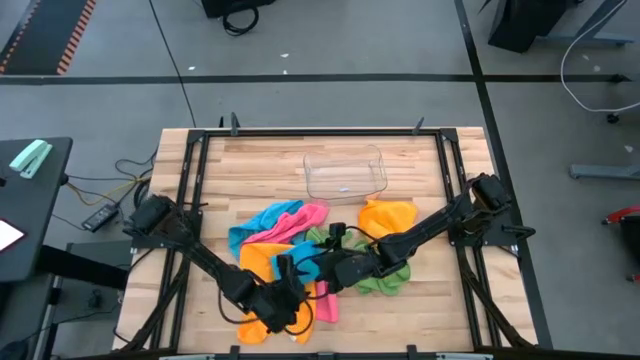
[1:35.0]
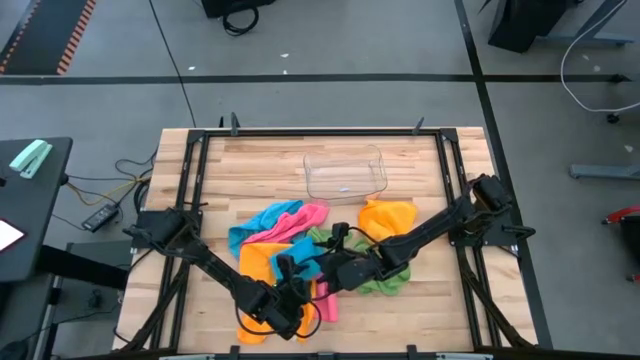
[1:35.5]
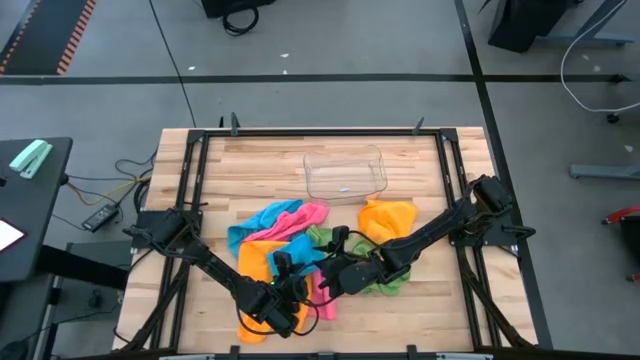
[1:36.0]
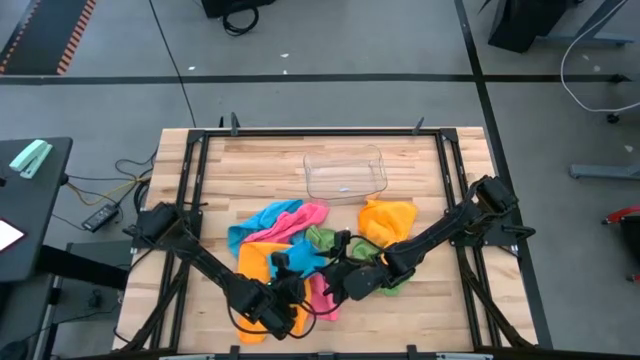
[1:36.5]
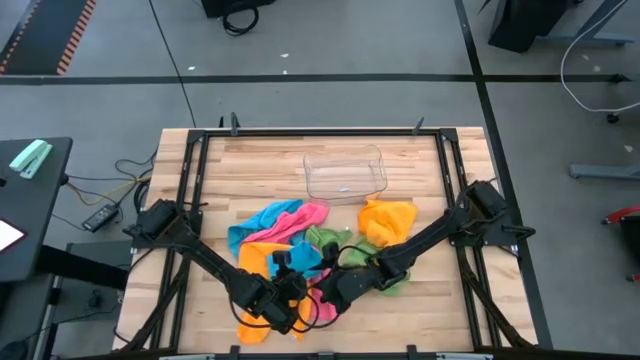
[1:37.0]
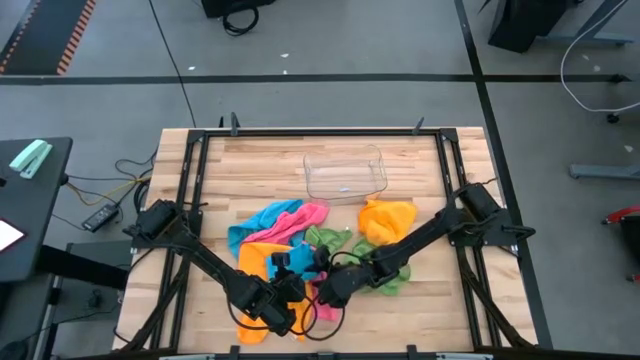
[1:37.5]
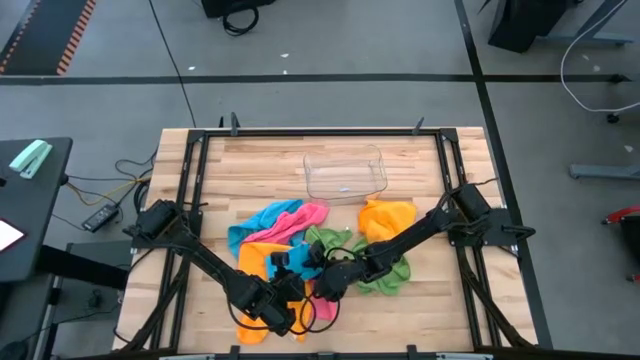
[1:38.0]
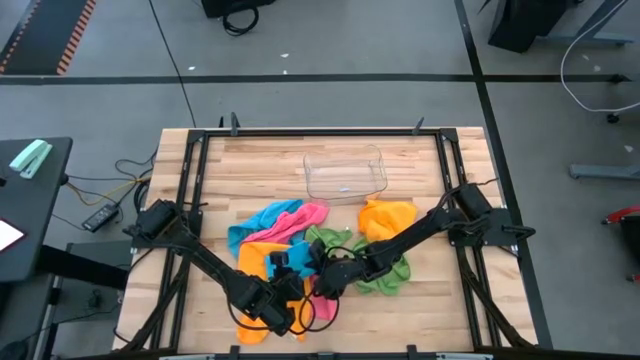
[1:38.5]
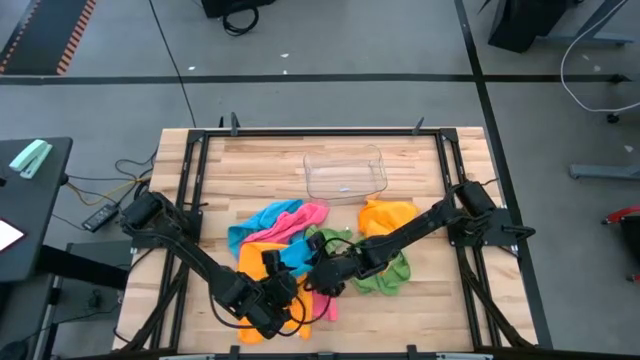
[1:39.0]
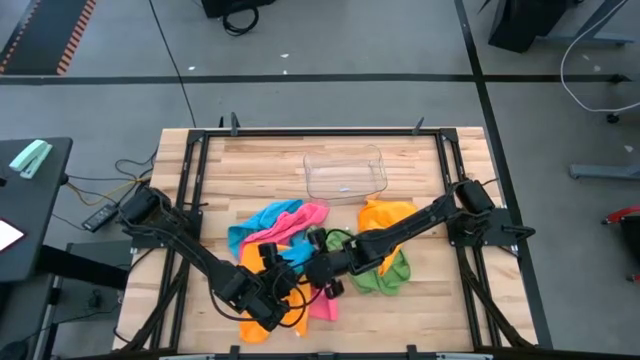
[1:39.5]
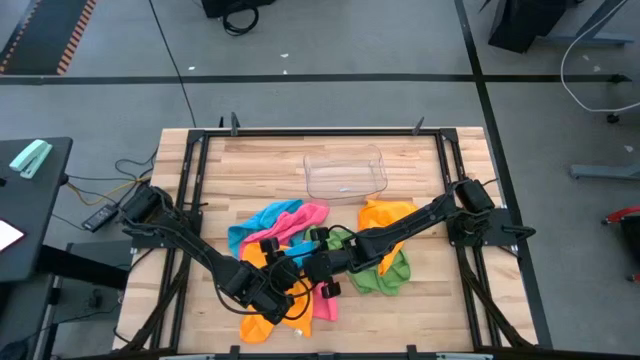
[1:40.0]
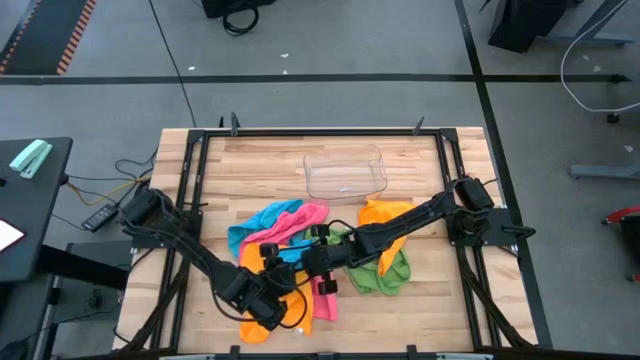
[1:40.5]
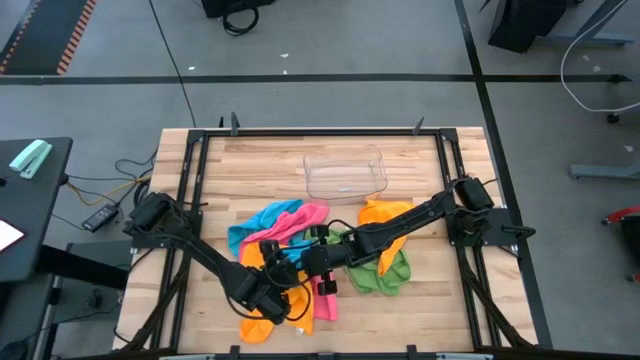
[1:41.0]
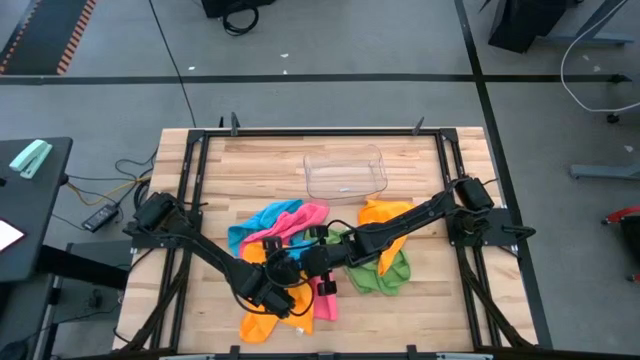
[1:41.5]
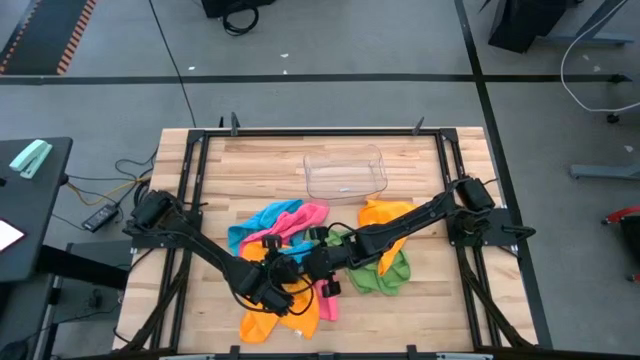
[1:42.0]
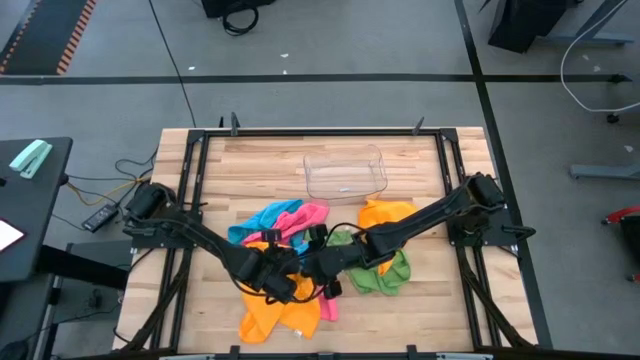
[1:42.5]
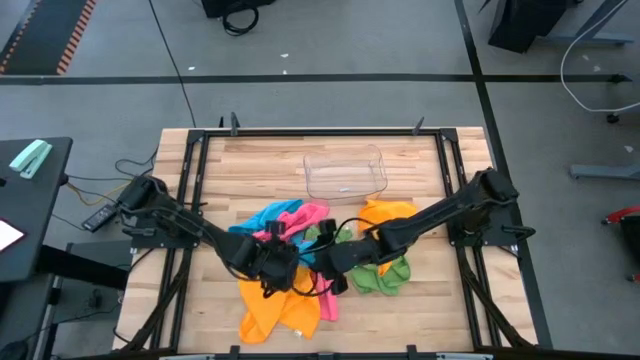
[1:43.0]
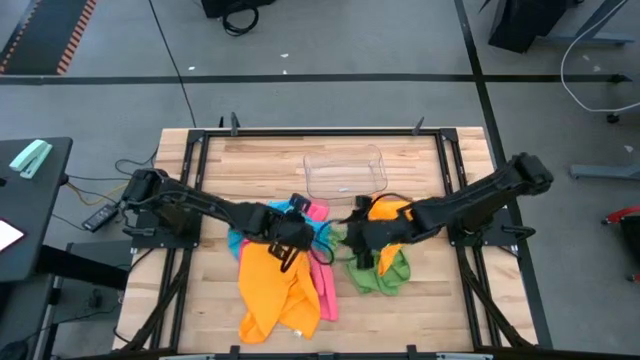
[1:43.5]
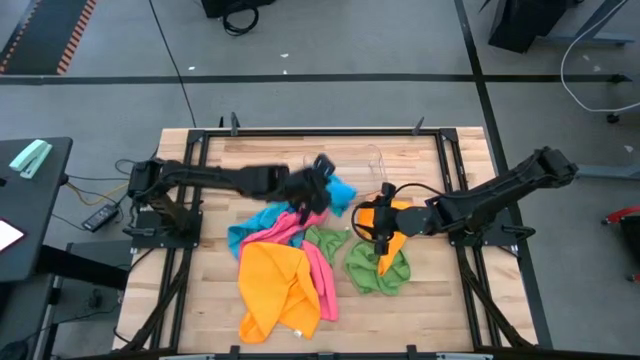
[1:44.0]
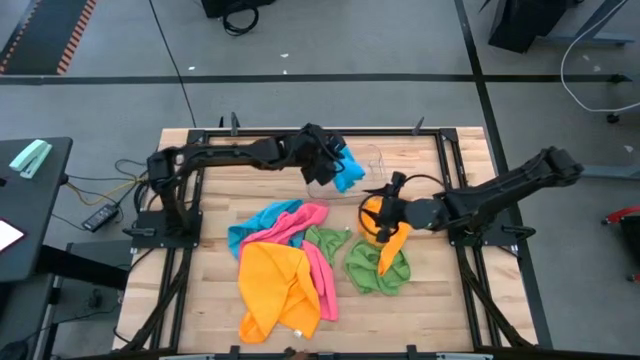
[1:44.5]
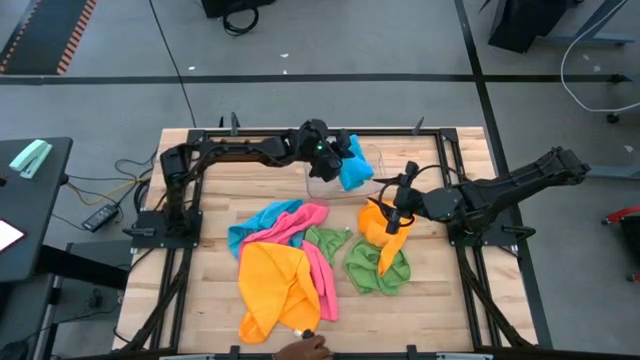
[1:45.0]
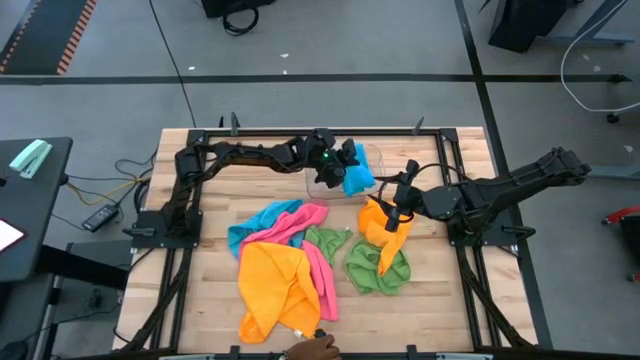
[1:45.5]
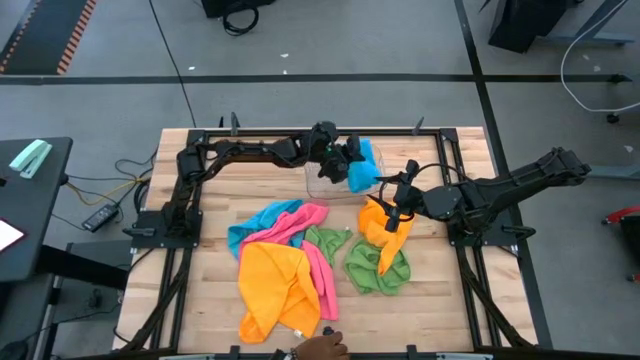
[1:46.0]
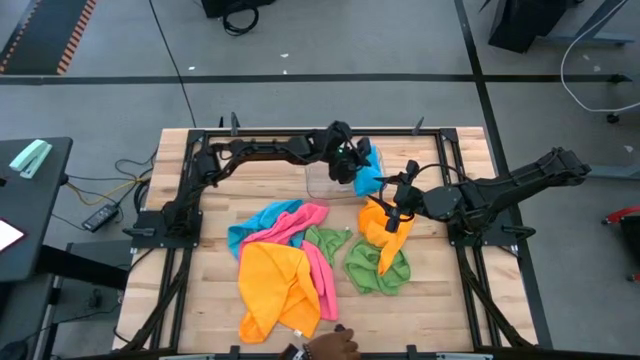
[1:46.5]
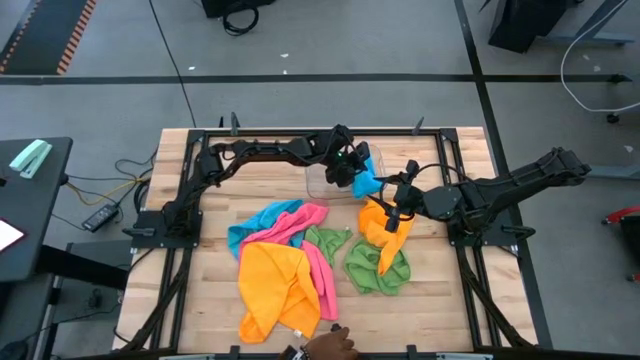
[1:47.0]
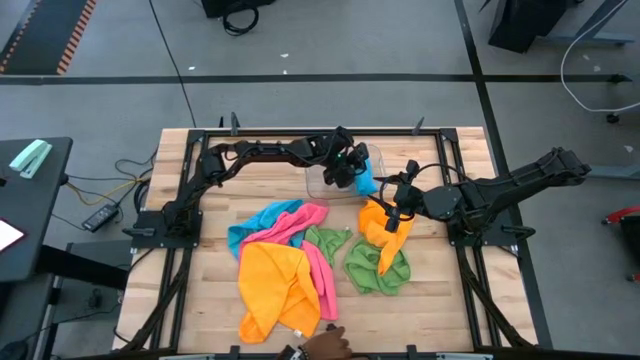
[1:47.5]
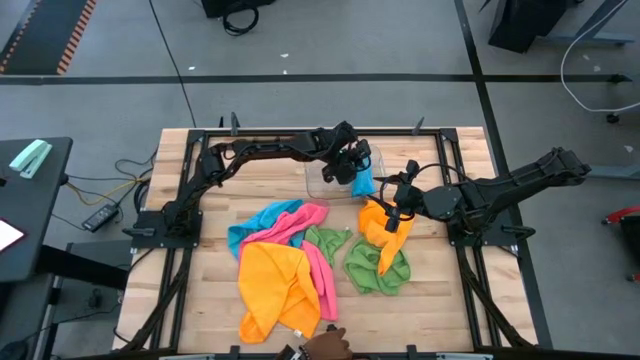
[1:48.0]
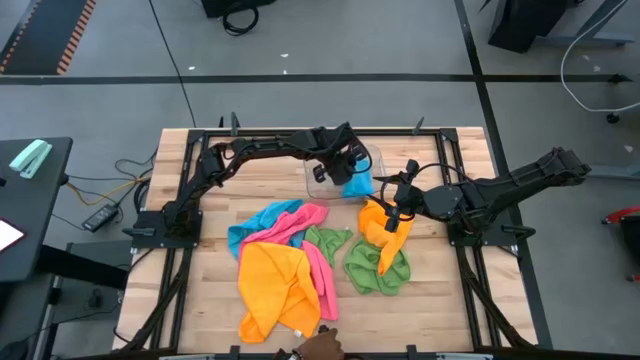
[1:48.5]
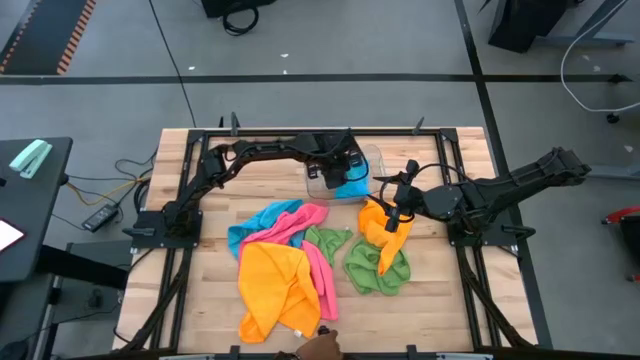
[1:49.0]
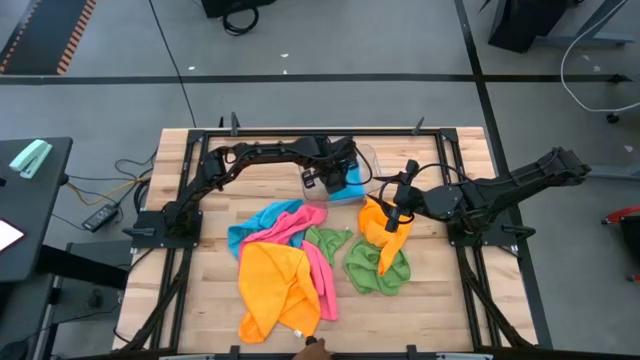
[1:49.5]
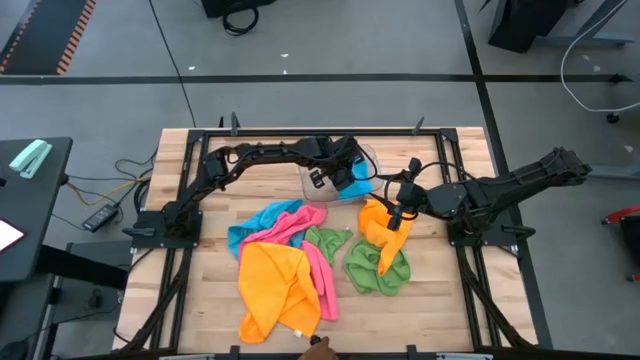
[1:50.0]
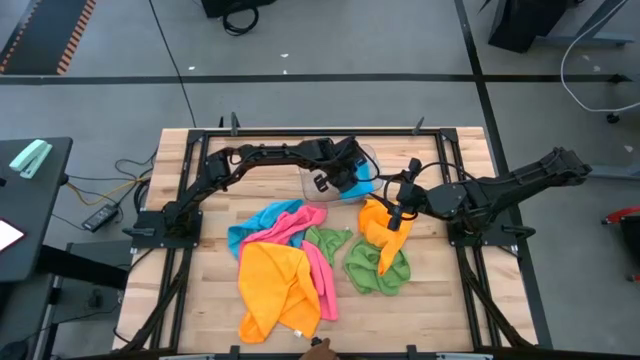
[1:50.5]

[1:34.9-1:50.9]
Task: Fold microfiber towels
Put the folded blue microfiber cloth into the transparent bin

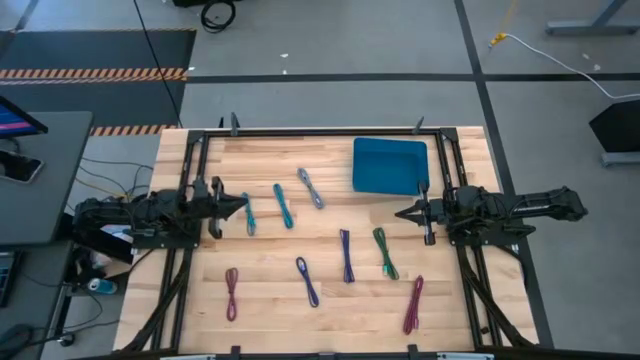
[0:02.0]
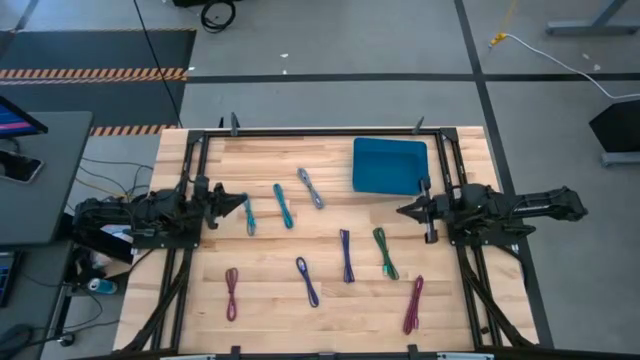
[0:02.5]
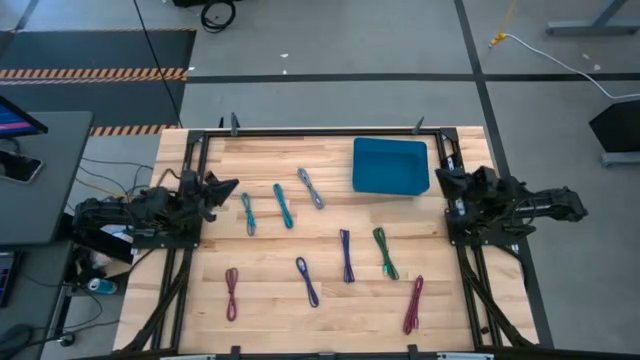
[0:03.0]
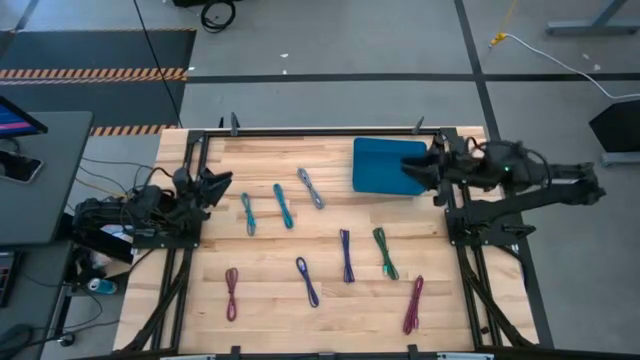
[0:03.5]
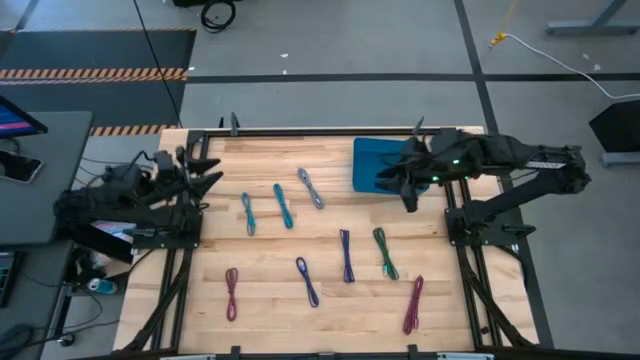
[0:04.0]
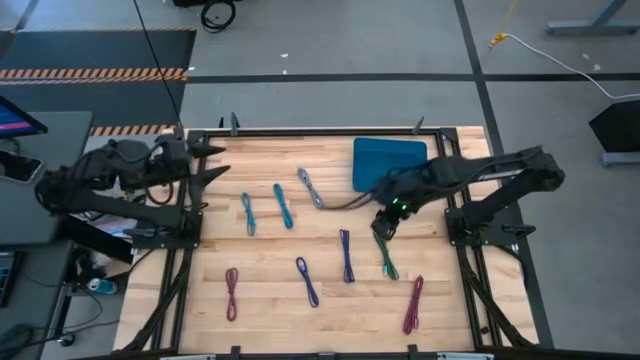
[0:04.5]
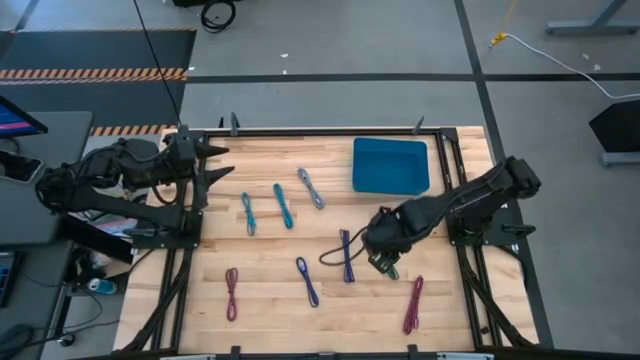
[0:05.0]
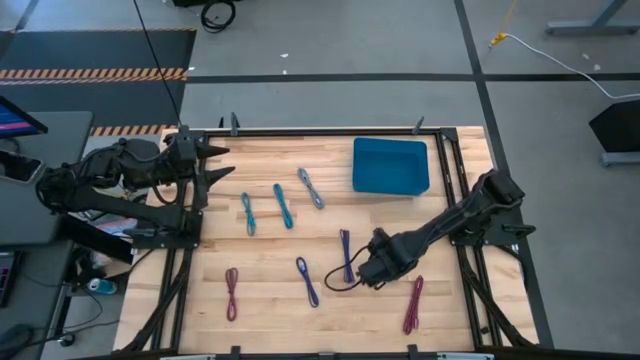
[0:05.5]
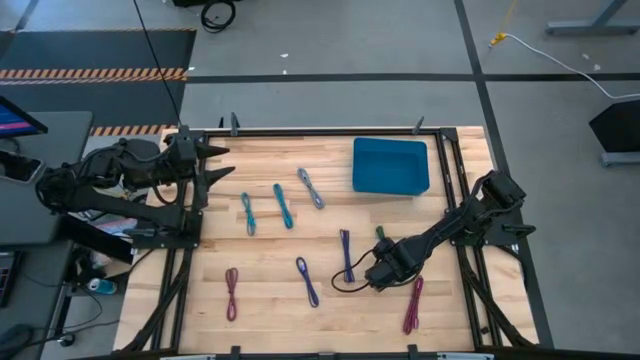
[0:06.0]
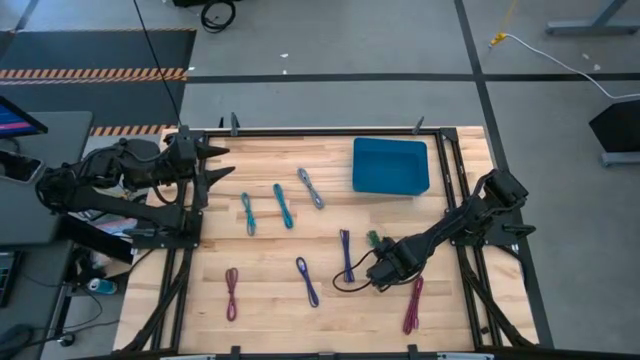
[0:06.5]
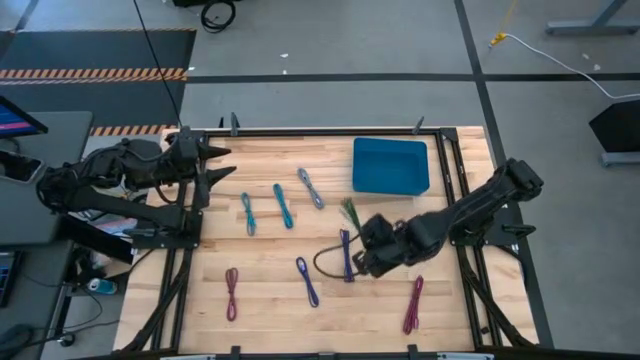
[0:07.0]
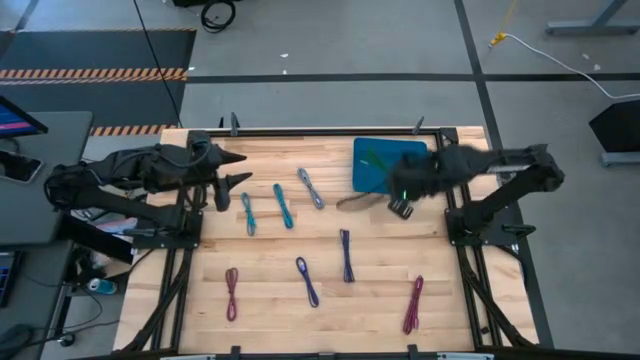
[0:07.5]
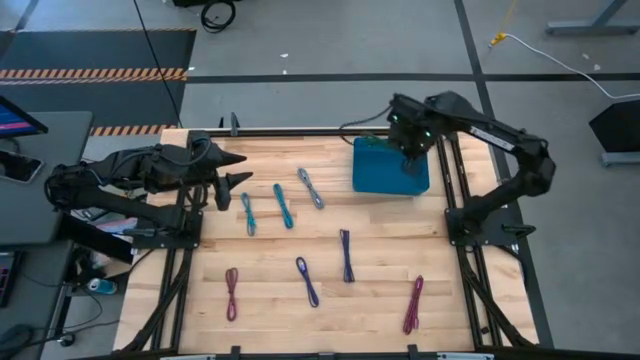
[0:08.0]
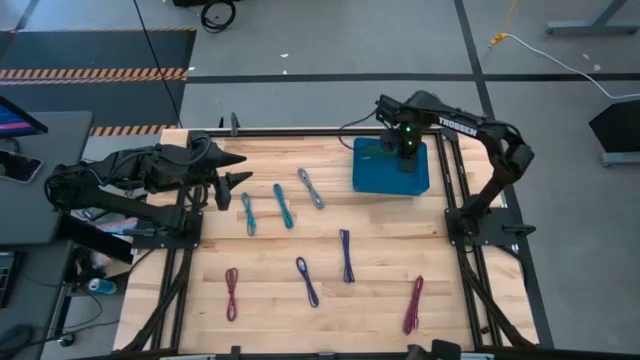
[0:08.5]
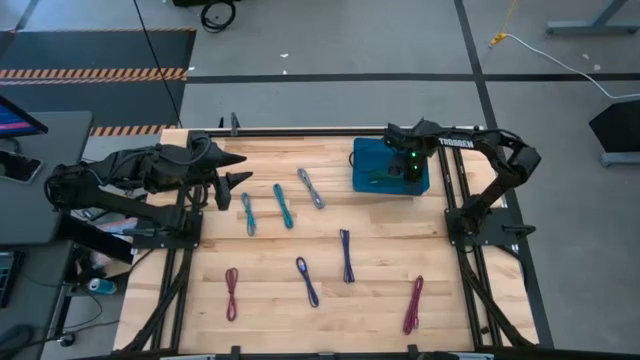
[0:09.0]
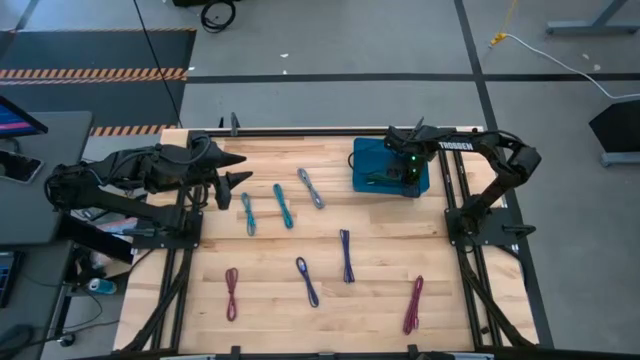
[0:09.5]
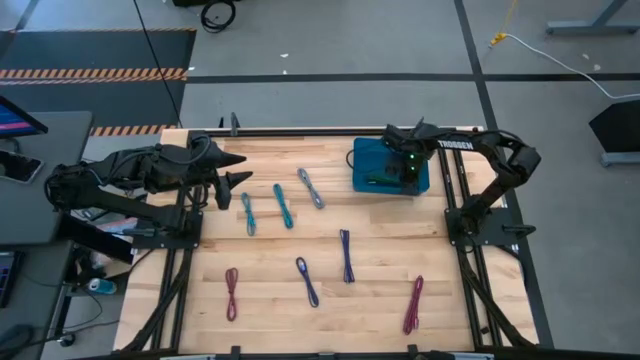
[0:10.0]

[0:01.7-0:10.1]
Task: Pick and place USB-C Cables
Put the black green charger cable into the blue bin
